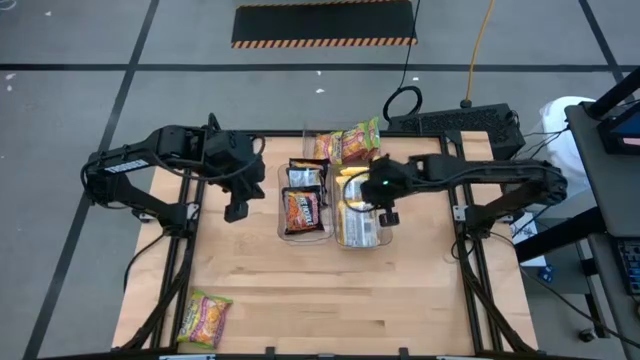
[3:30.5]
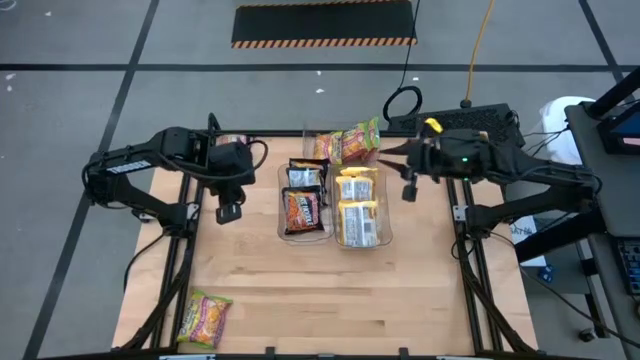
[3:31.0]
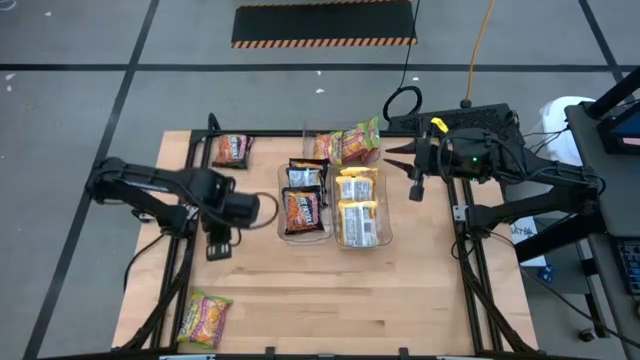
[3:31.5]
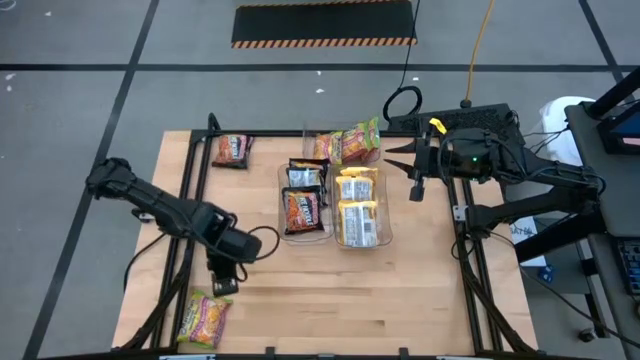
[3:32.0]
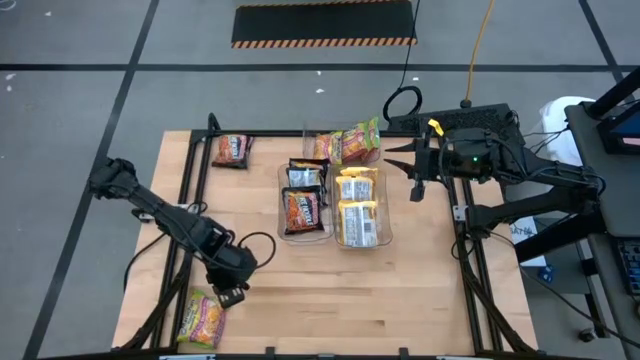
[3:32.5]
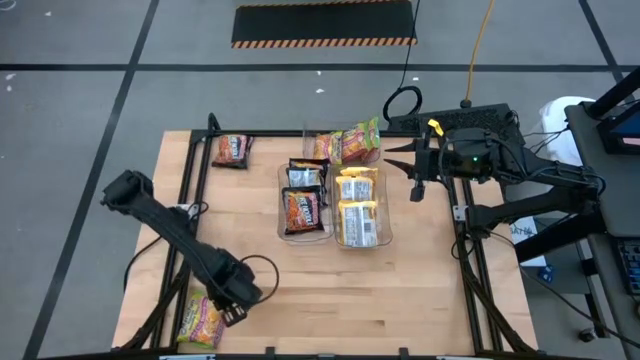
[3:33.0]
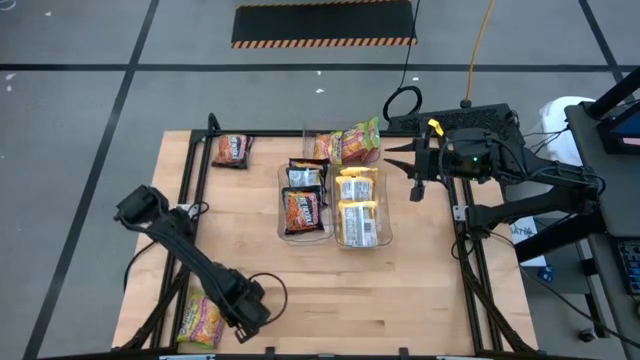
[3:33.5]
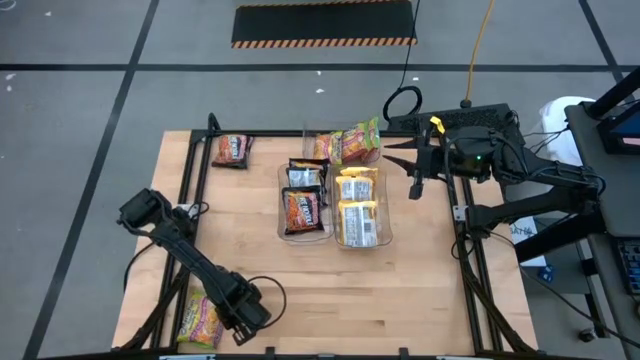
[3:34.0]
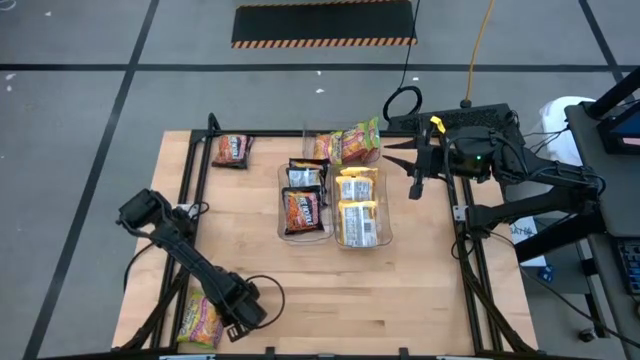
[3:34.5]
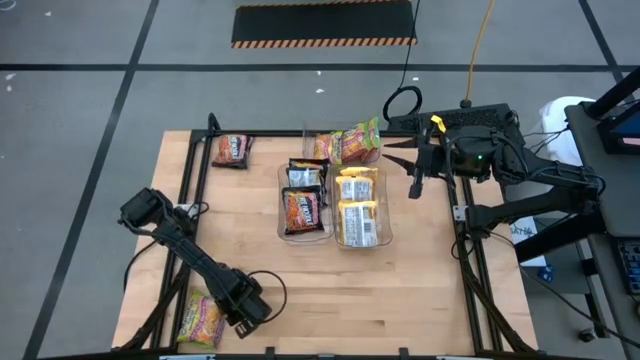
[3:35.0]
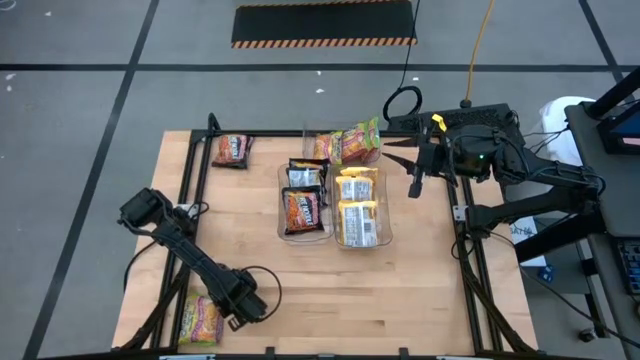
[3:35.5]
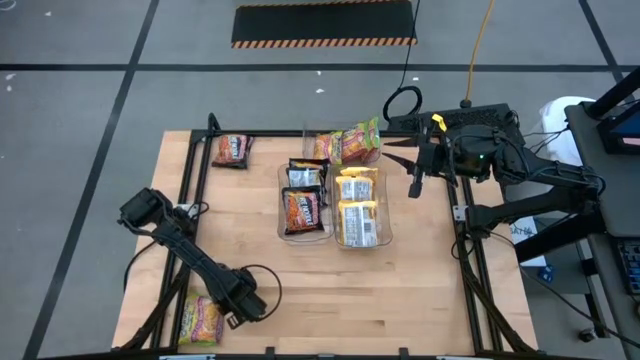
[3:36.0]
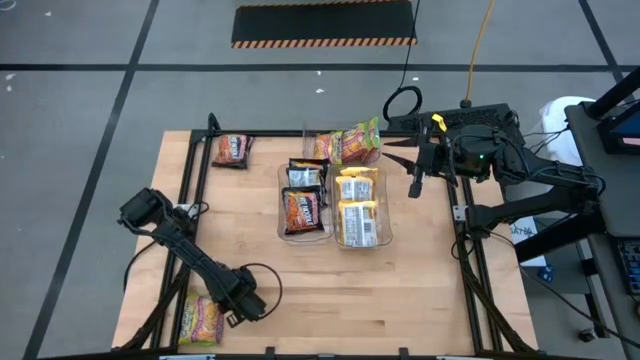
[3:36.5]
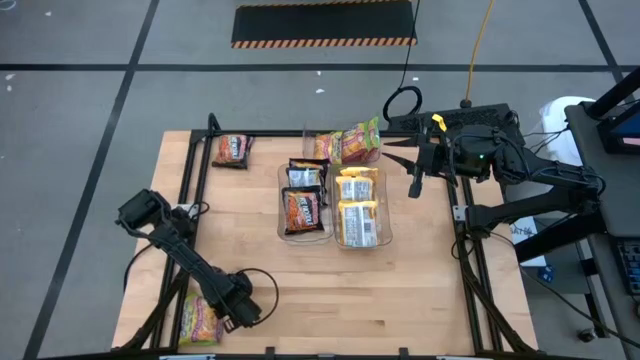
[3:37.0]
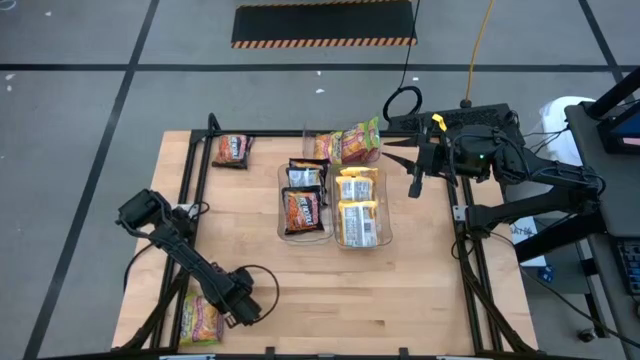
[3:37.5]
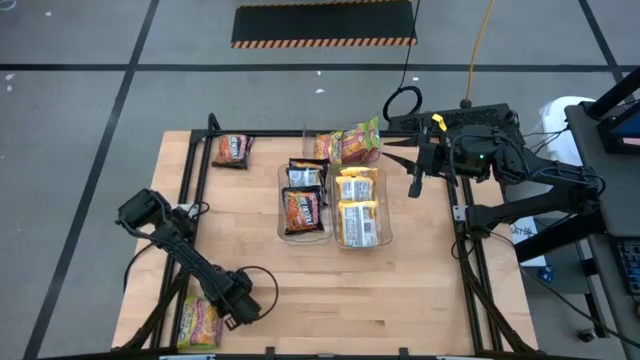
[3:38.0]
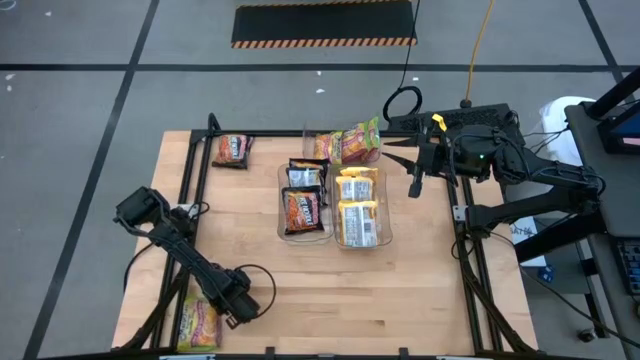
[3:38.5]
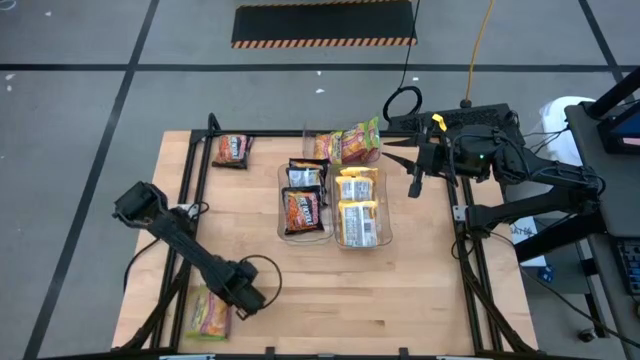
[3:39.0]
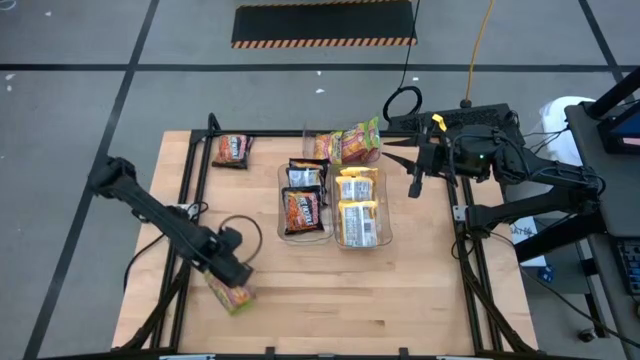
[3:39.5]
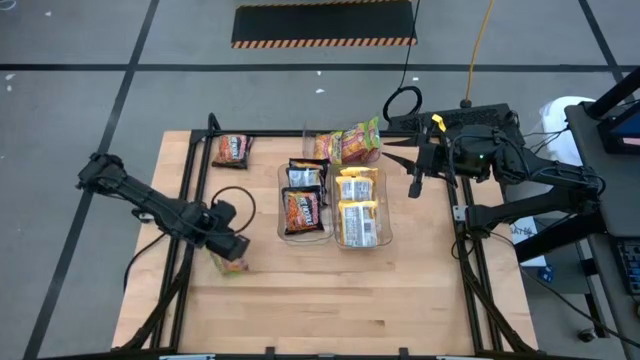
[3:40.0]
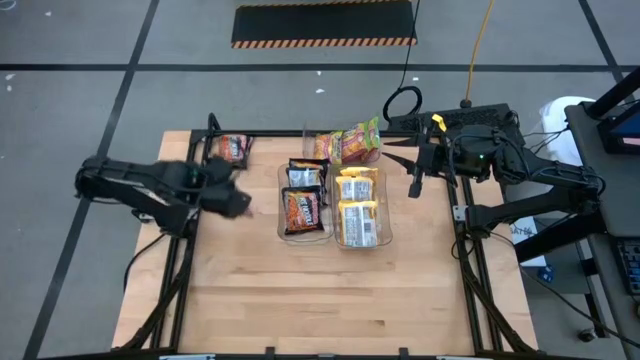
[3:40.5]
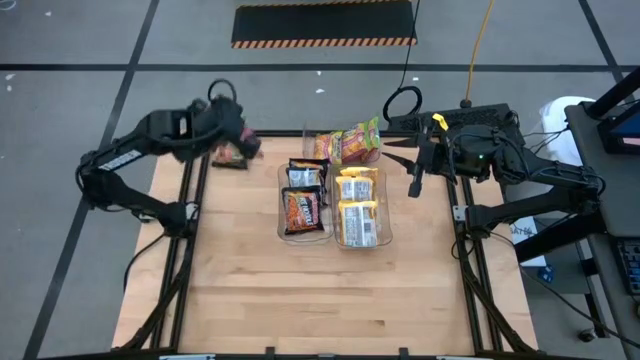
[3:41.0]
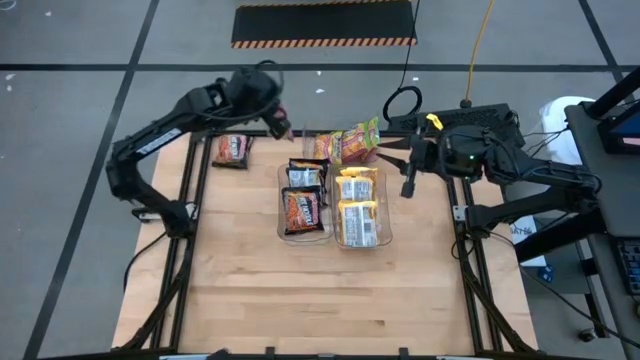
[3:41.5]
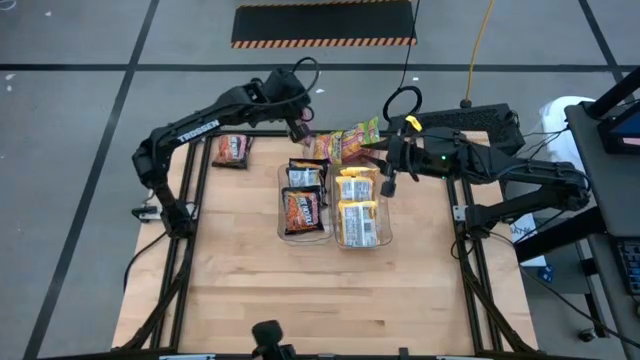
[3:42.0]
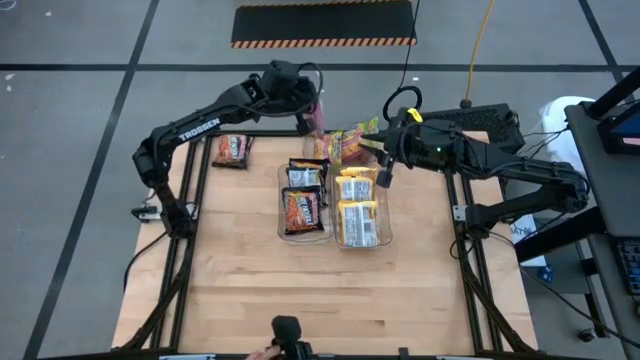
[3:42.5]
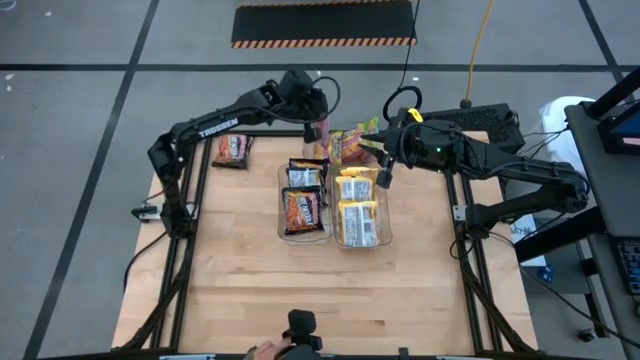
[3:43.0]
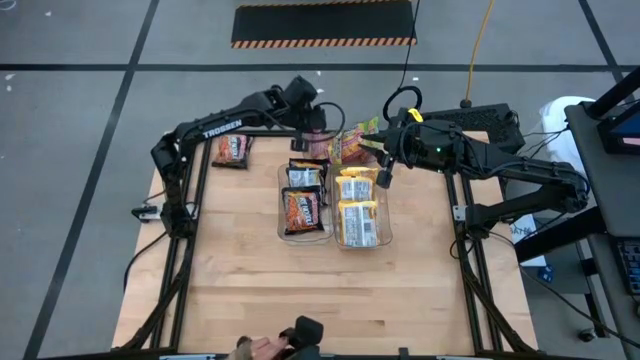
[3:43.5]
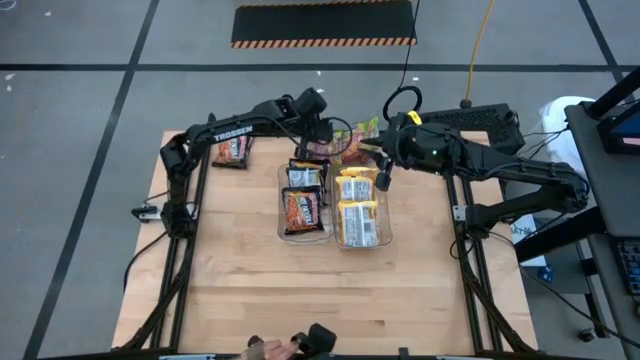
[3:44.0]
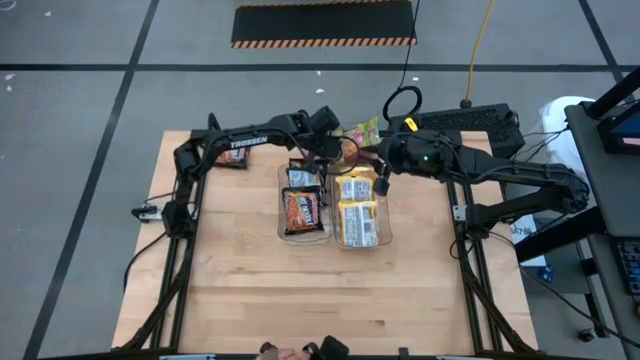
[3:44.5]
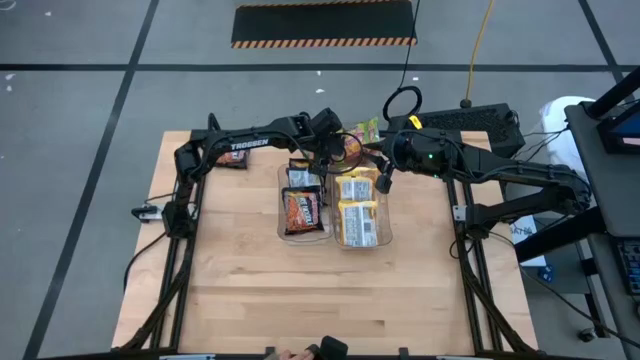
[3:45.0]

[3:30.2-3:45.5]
Task: Sort Maruchan noodles
Put the green noodle pack into the top transparent bin

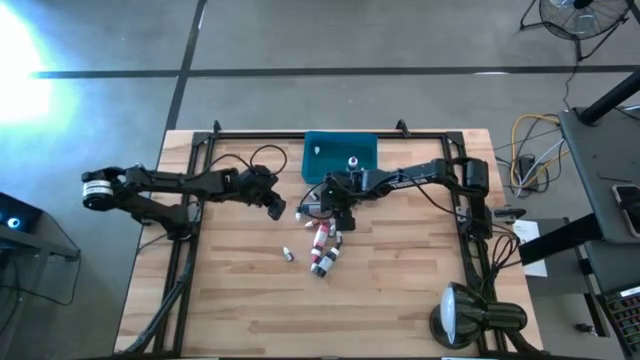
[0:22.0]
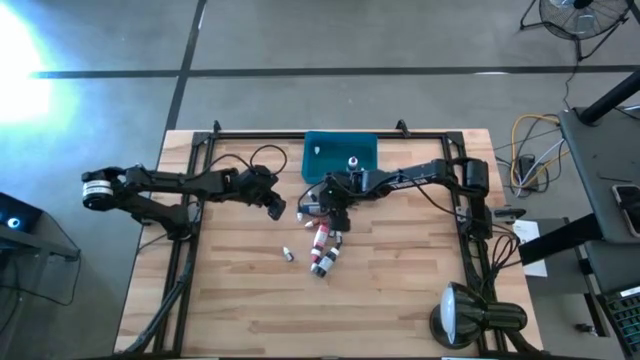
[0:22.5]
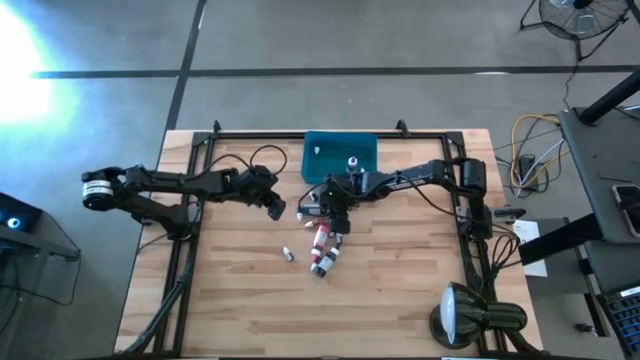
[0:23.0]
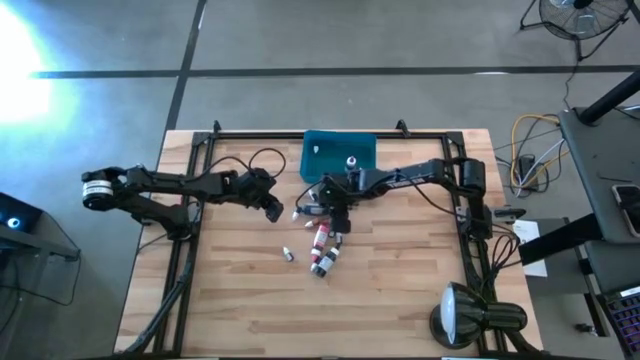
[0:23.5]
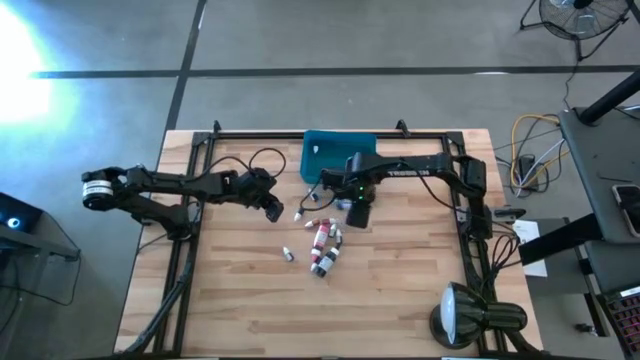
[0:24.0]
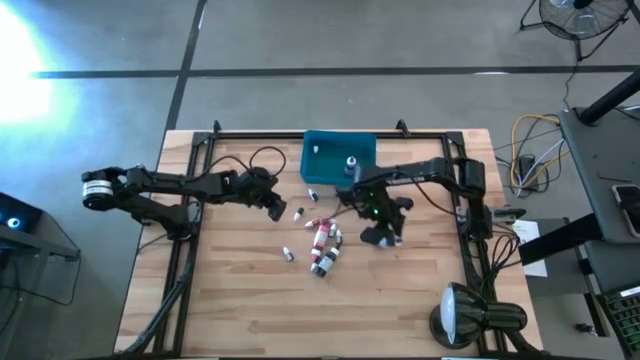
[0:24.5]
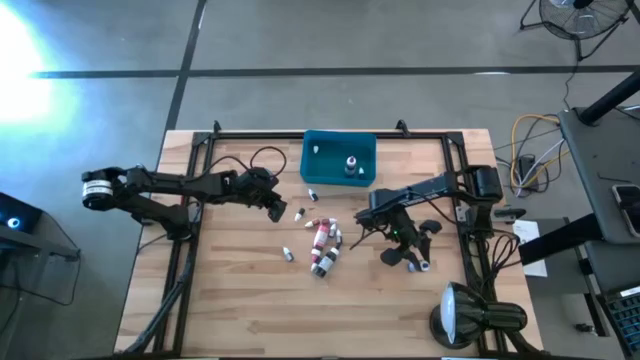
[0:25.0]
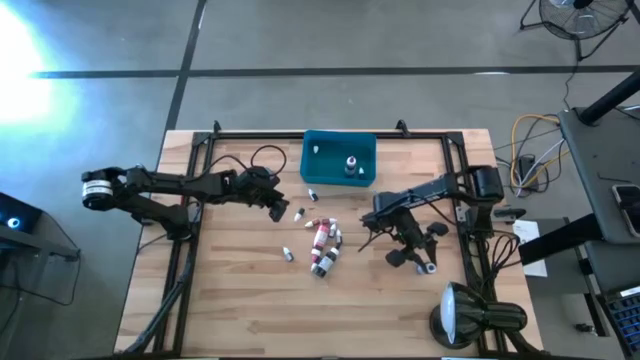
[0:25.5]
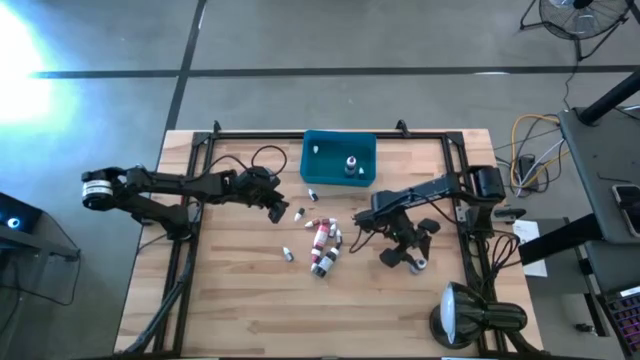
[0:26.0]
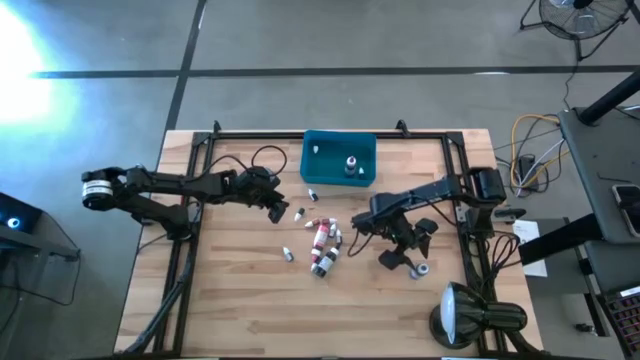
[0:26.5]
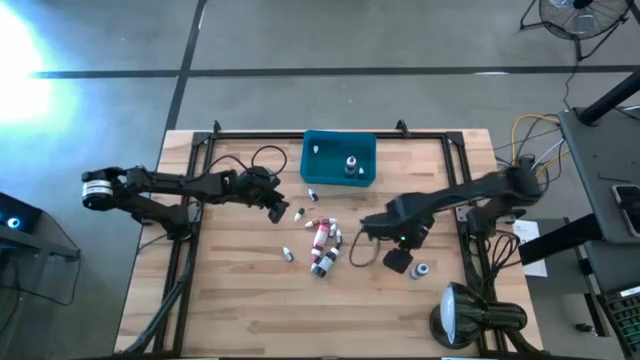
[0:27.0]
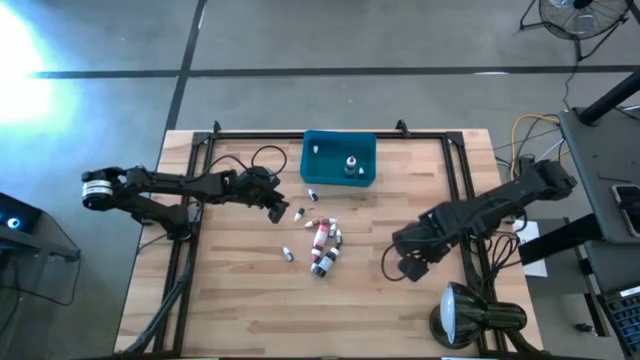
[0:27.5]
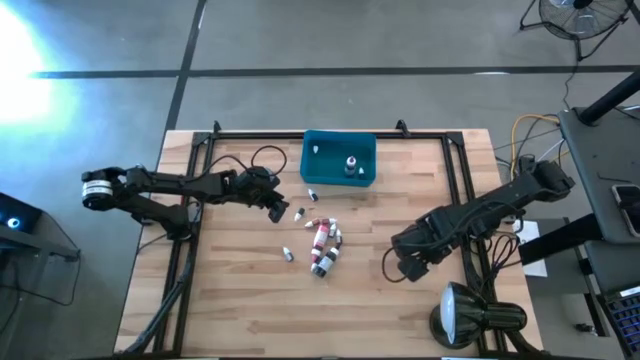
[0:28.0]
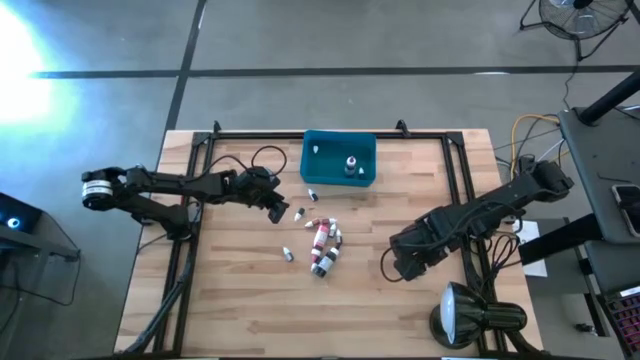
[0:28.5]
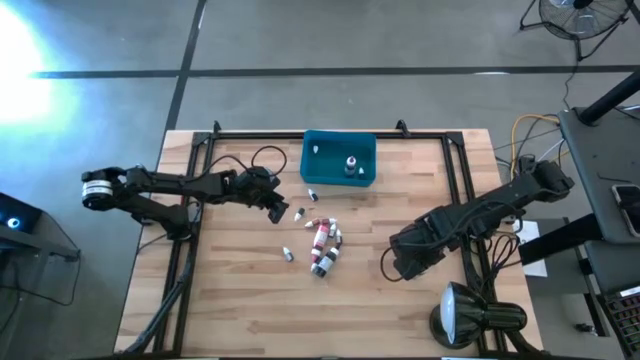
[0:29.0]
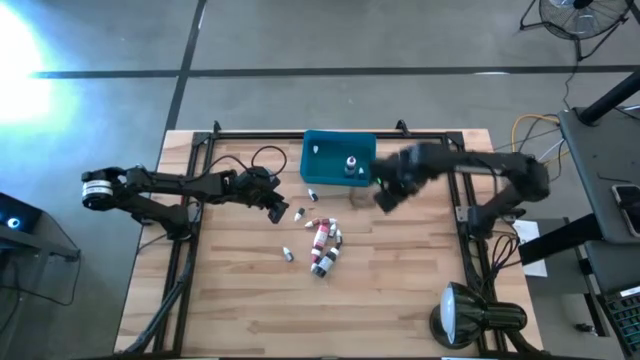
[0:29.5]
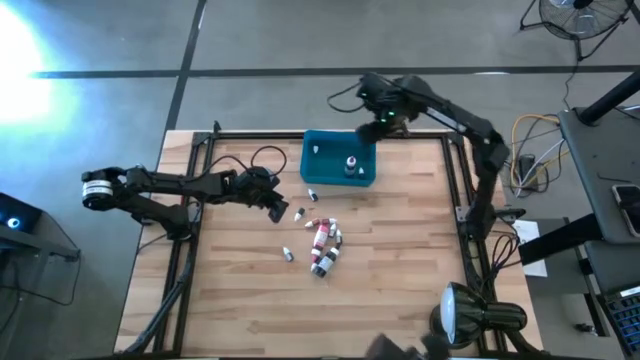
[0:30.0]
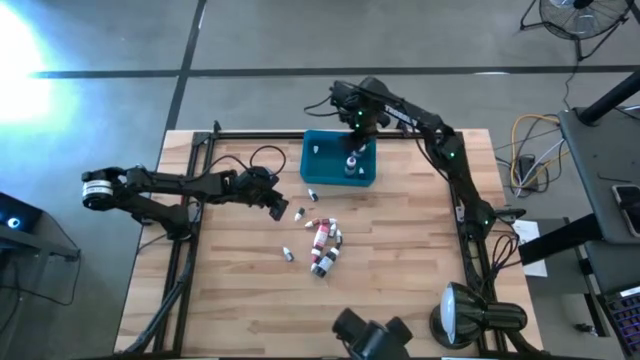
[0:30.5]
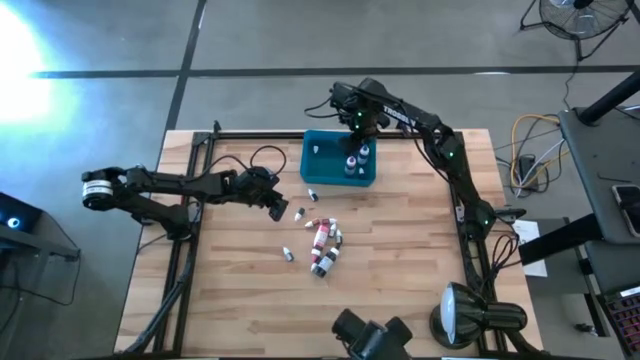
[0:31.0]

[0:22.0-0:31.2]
Task: Pick & Place food coloring
Put the large blue food coloring bottle into the blue bin
